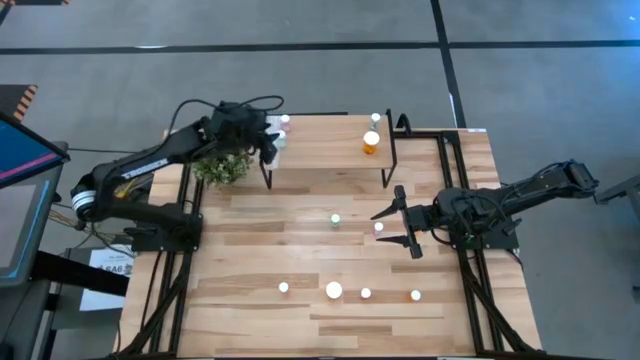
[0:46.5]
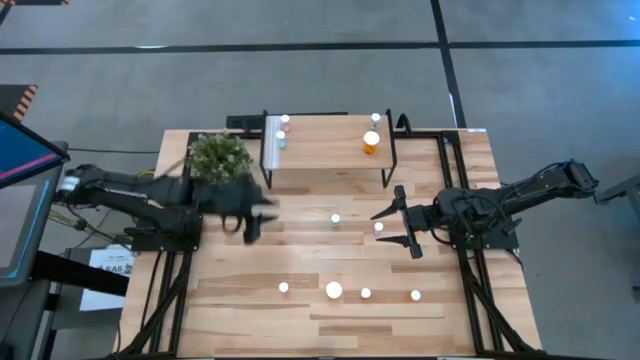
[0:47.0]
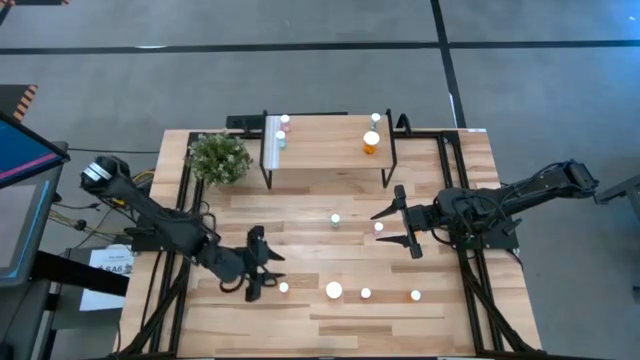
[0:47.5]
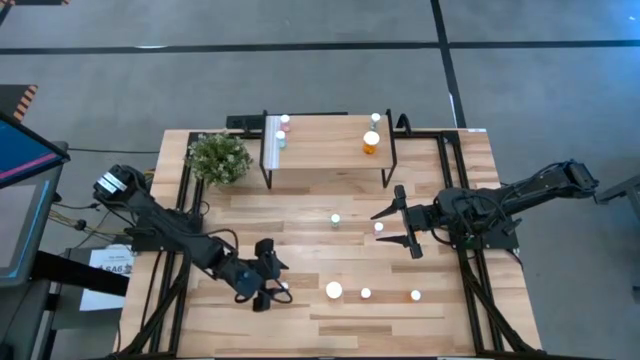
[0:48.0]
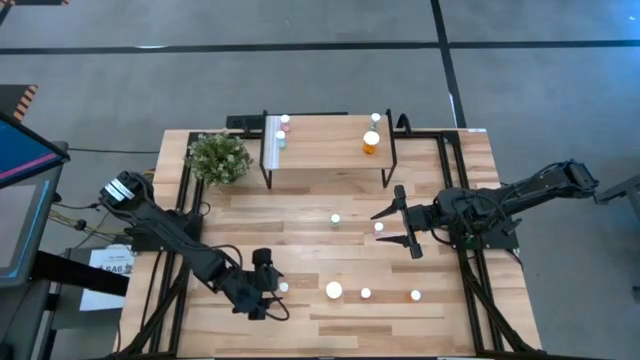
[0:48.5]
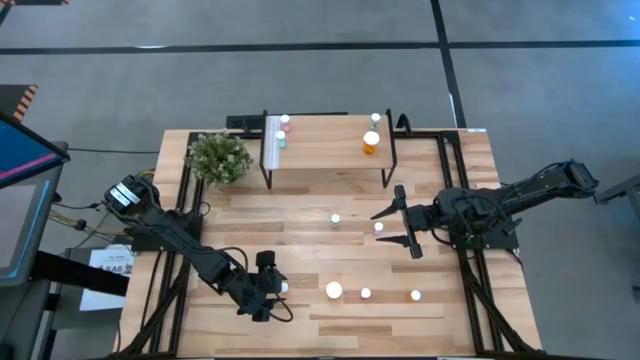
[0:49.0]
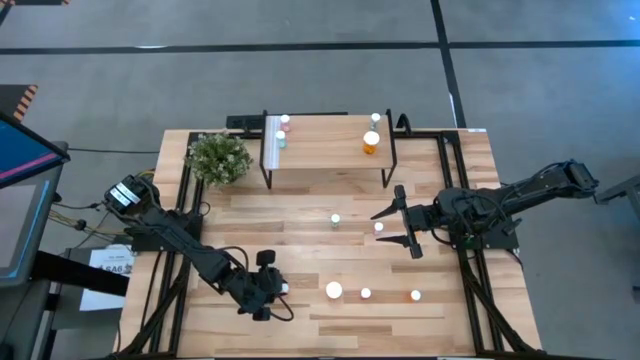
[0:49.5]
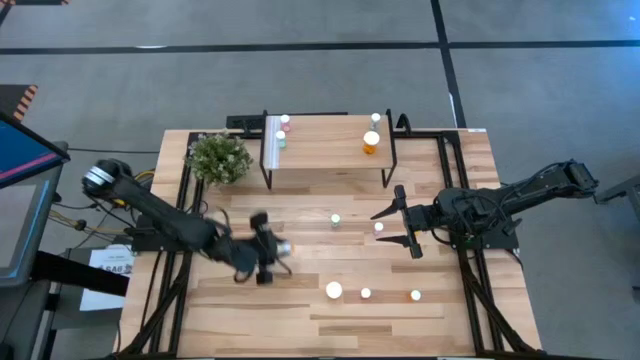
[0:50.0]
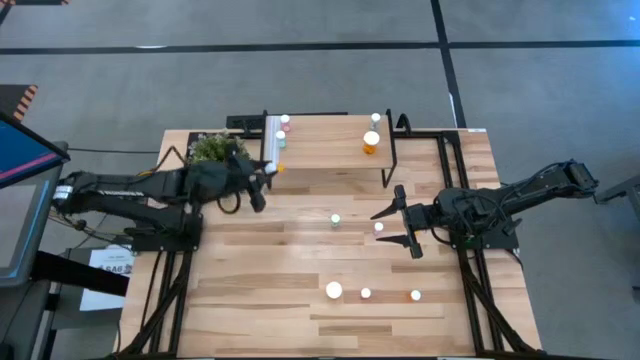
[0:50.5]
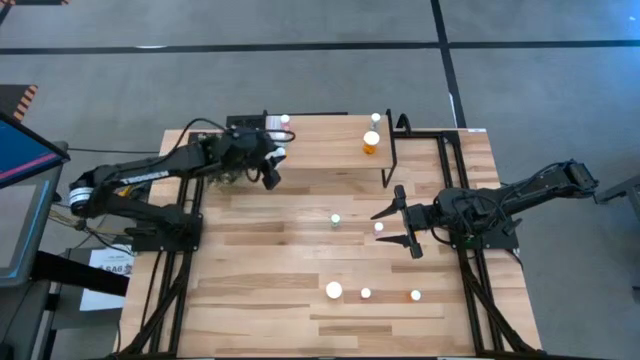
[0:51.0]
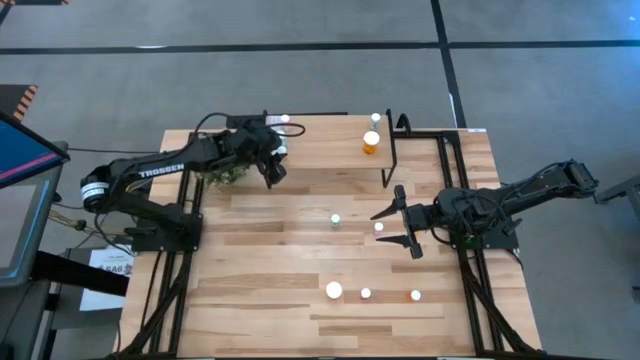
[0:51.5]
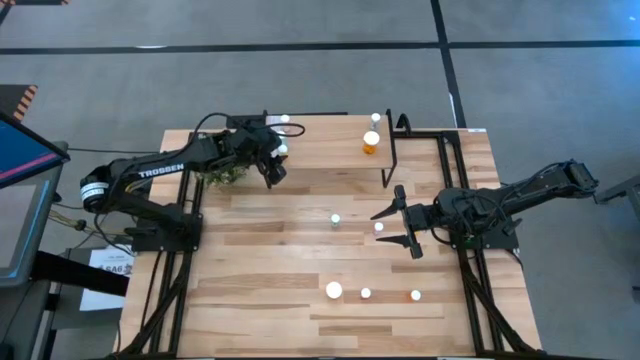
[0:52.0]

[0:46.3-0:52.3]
Task: Pick and place medicine bottles onto shelf by color
Put the bottom left small orange pill bottle on the shelf

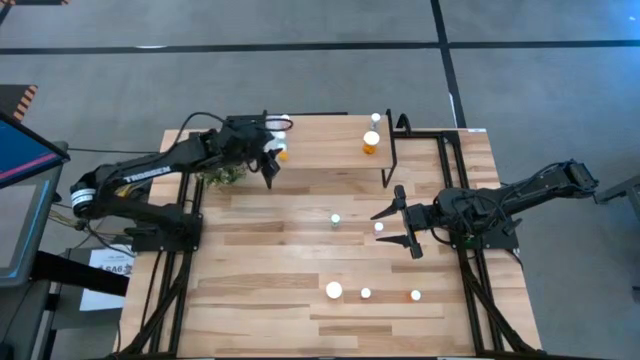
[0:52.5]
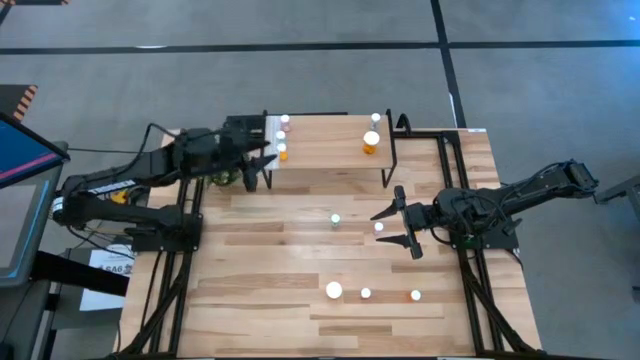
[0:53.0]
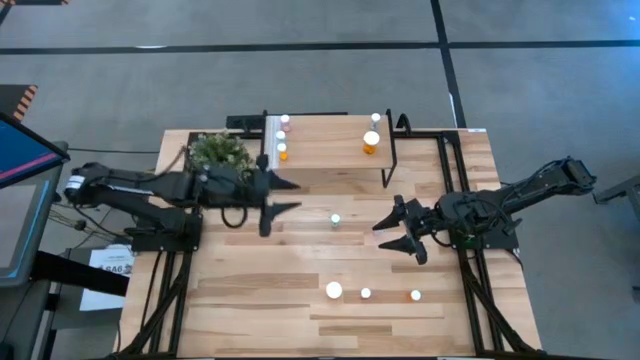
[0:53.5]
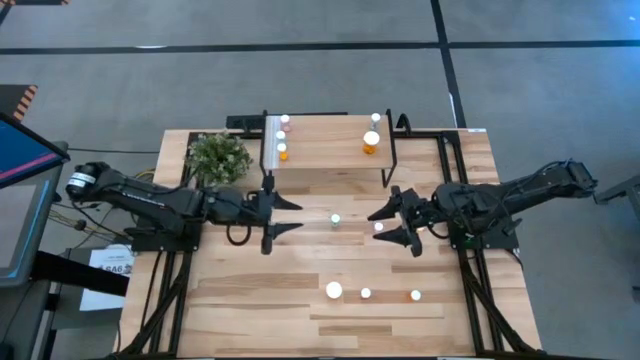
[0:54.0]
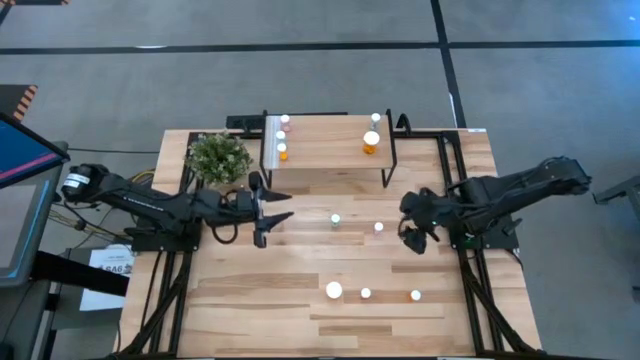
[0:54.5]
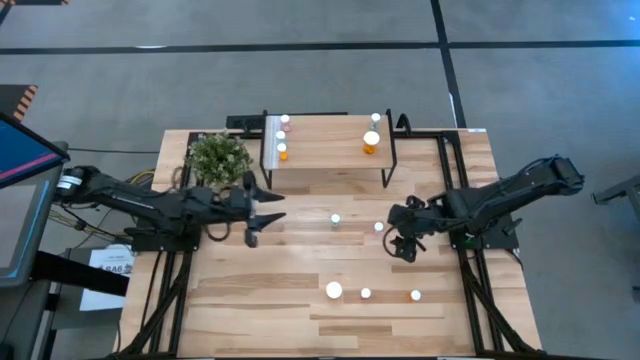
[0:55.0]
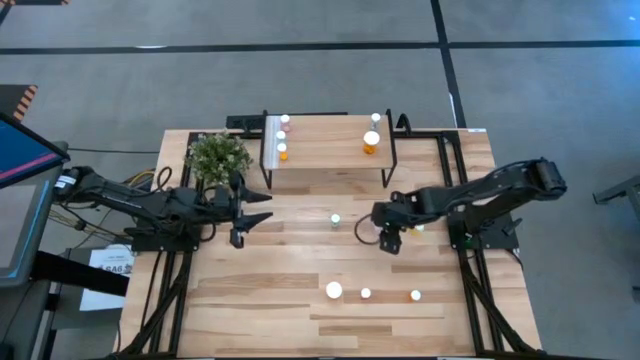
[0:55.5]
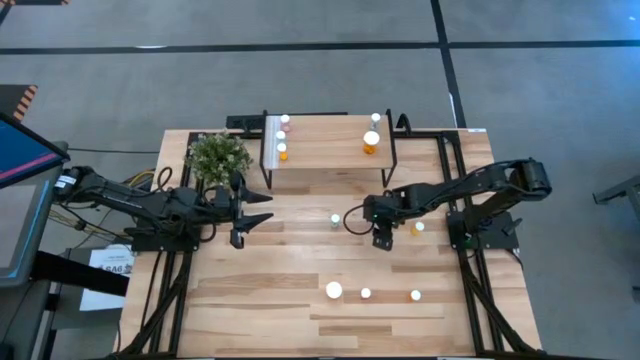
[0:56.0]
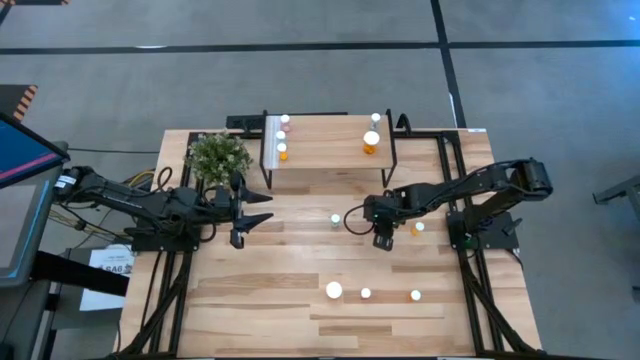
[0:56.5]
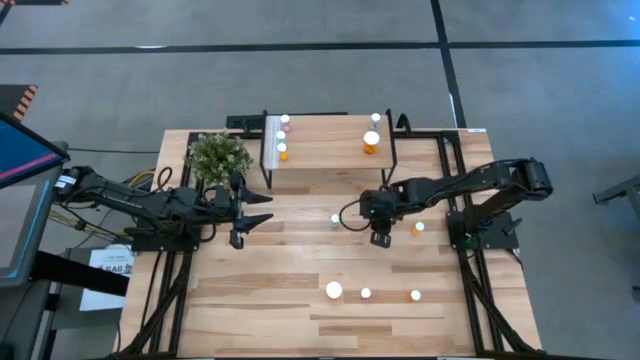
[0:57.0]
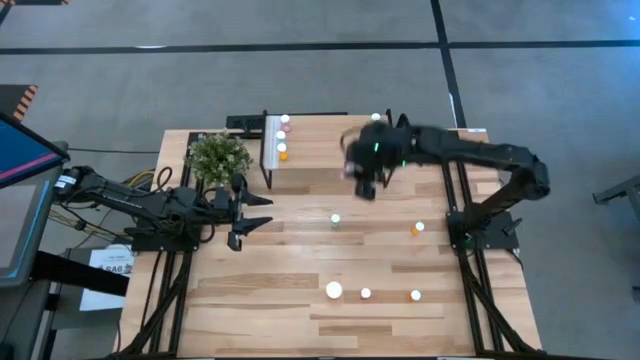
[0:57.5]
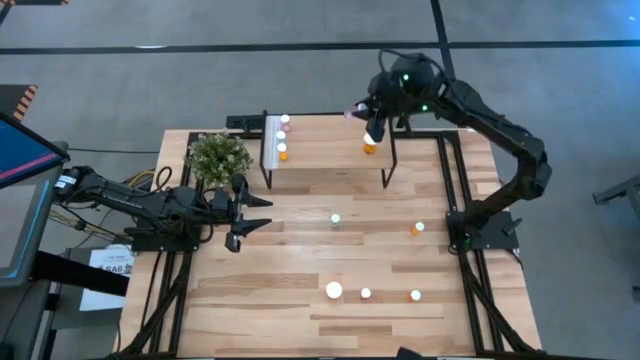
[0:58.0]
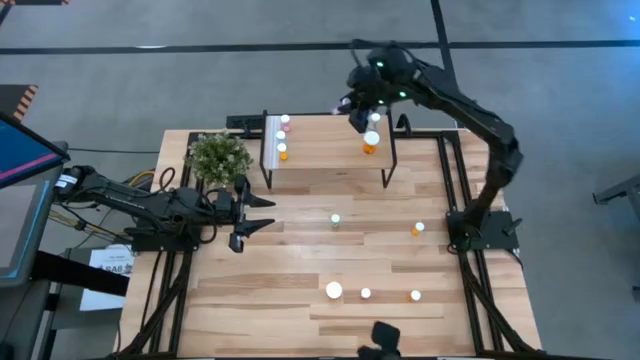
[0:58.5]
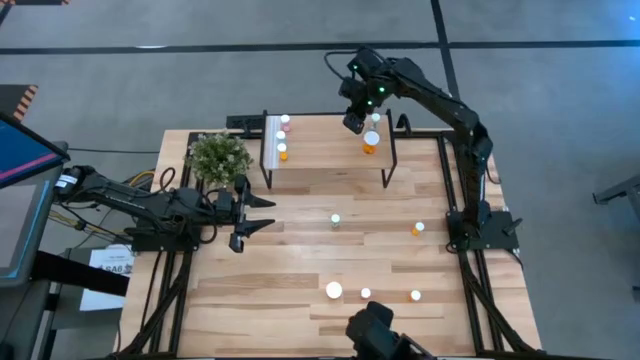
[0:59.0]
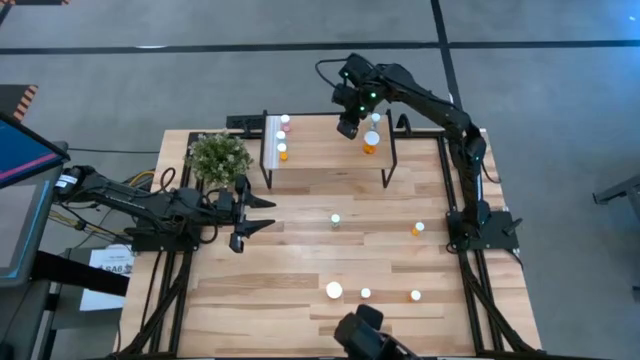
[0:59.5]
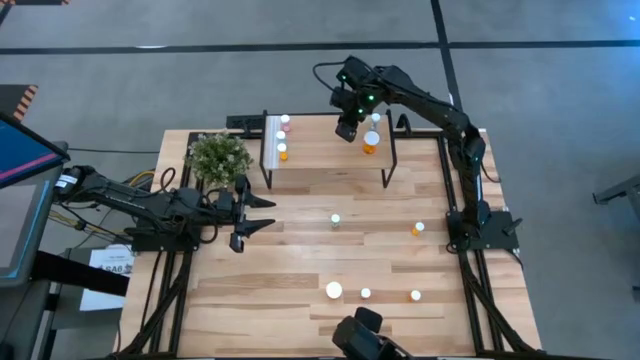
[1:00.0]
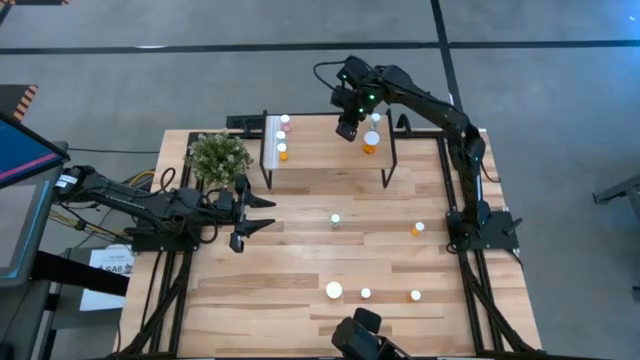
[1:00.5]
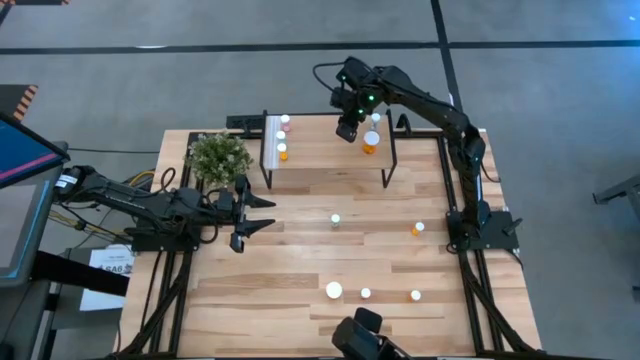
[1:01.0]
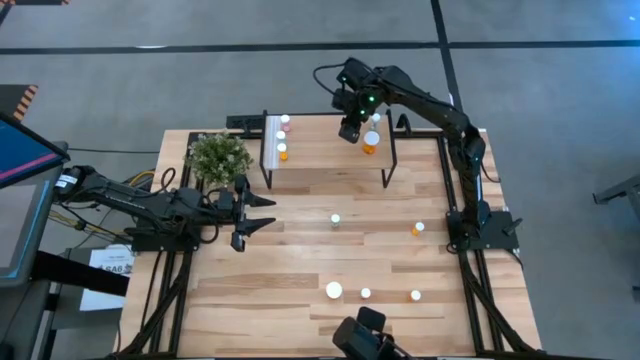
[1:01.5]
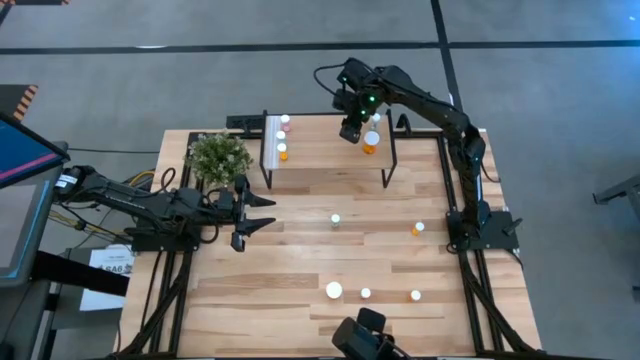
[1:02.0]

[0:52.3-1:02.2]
Put the top pink pill bottle on the shelf

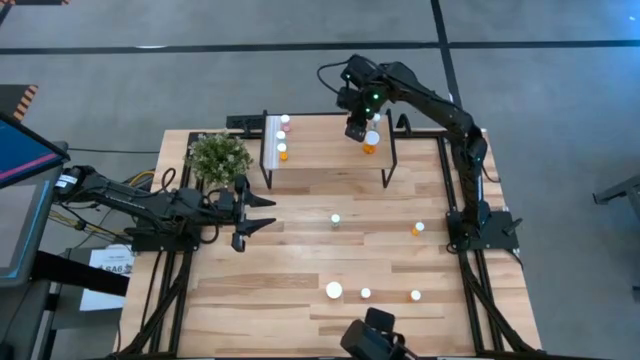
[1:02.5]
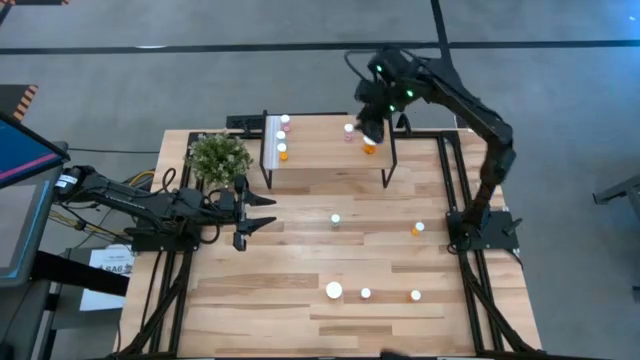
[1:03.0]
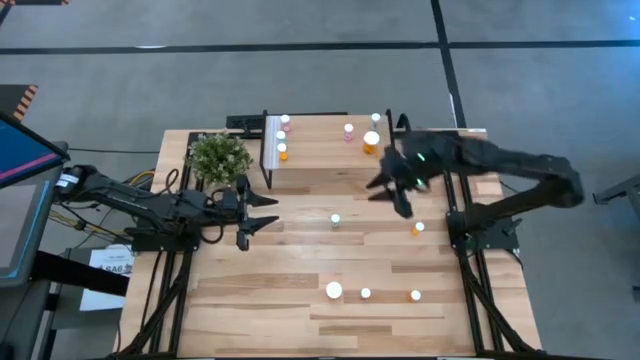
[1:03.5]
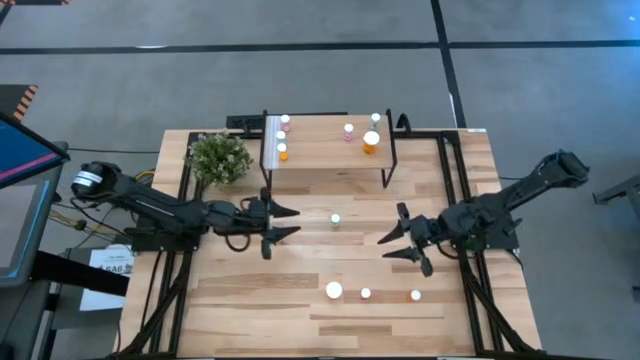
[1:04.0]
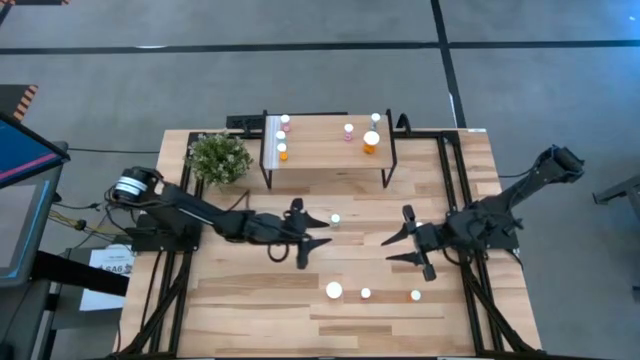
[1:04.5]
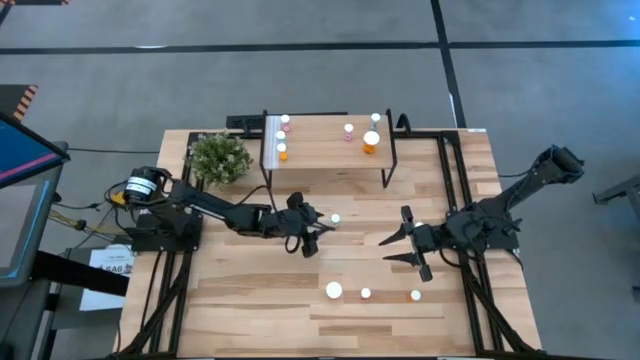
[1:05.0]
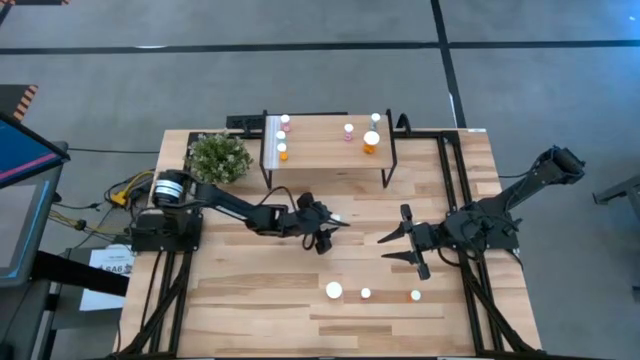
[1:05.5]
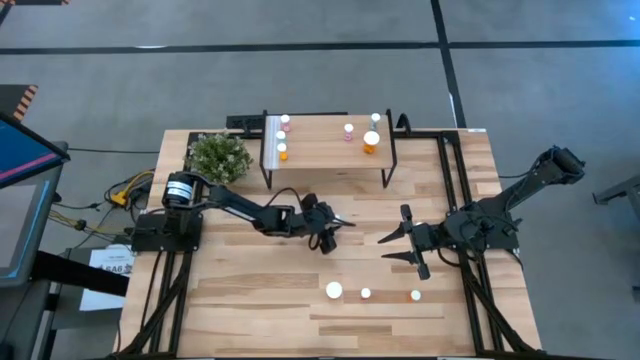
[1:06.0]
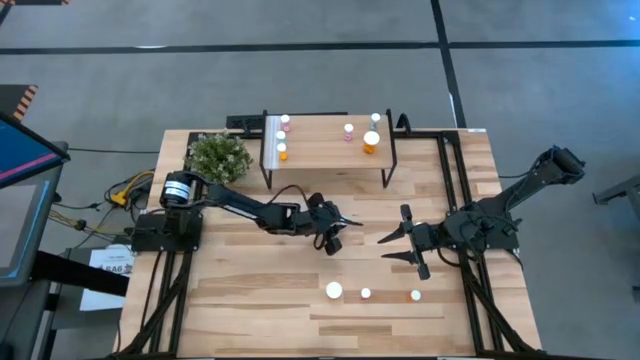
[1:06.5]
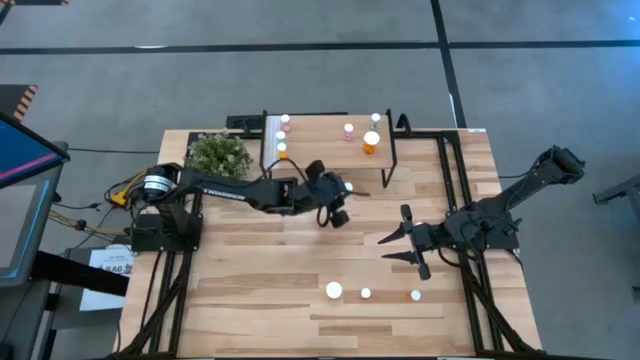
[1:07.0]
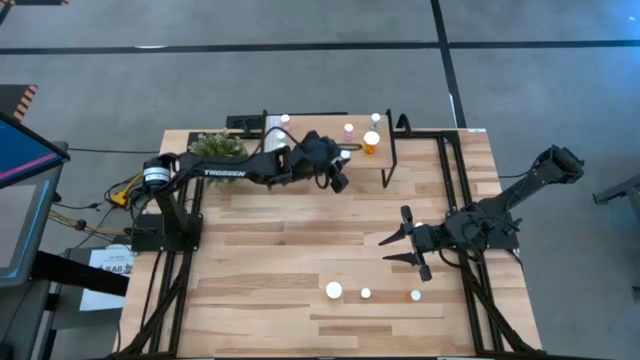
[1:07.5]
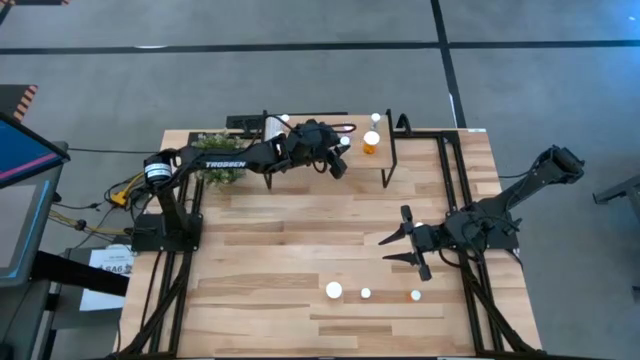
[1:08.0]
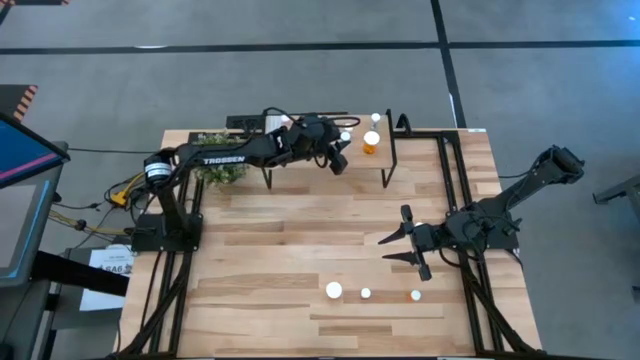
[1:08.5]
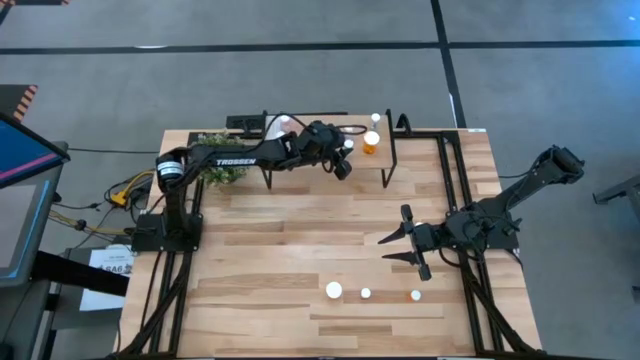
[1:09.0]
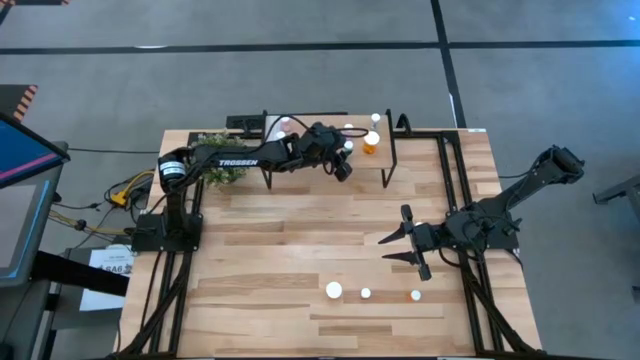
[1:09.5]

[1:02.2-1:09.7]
Put the blue pill bottle on the shelf
